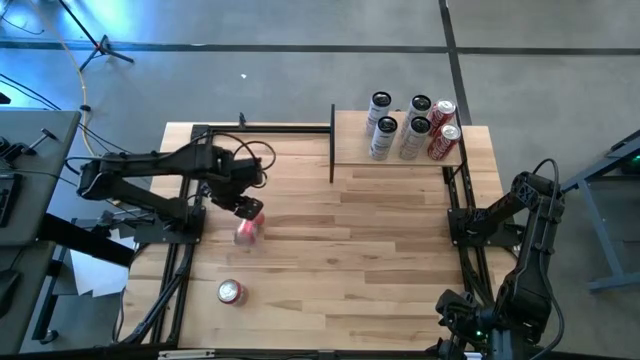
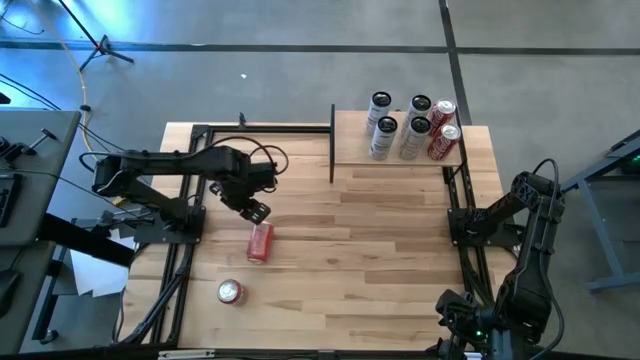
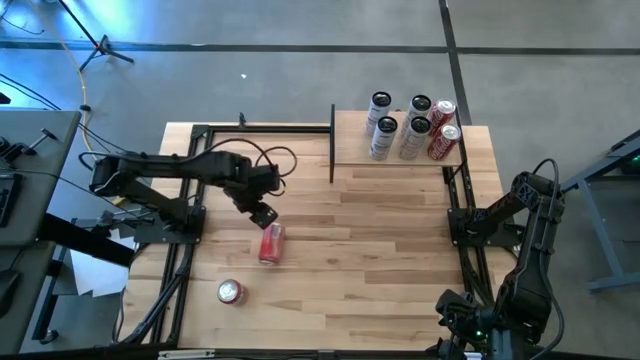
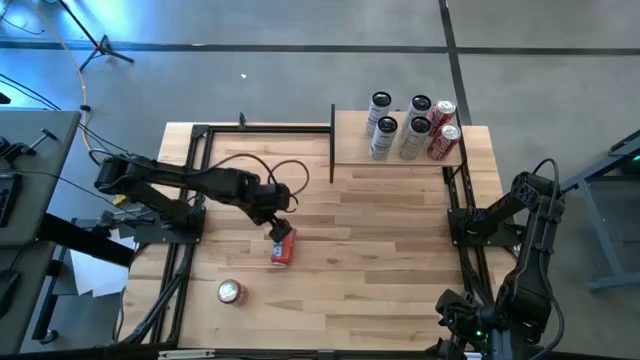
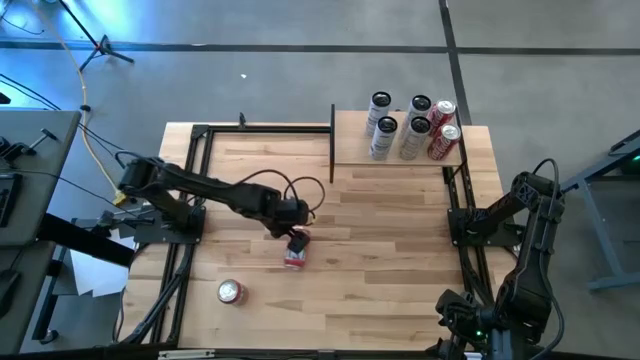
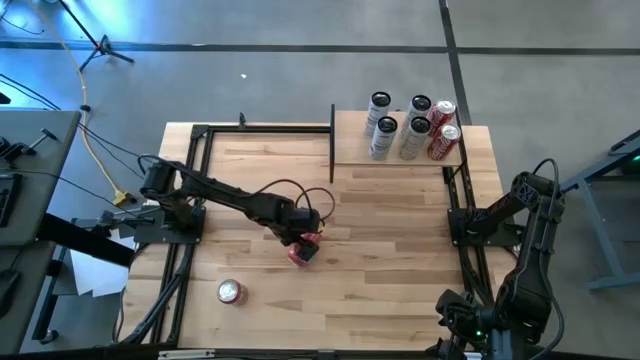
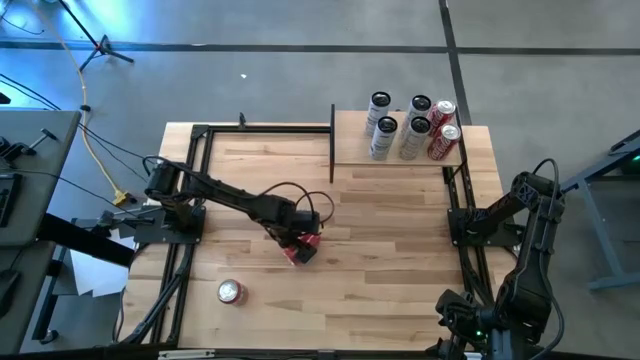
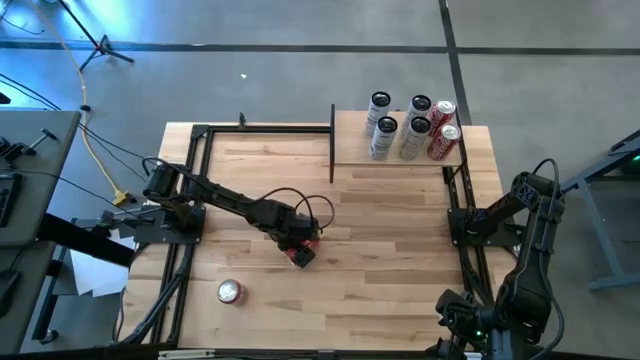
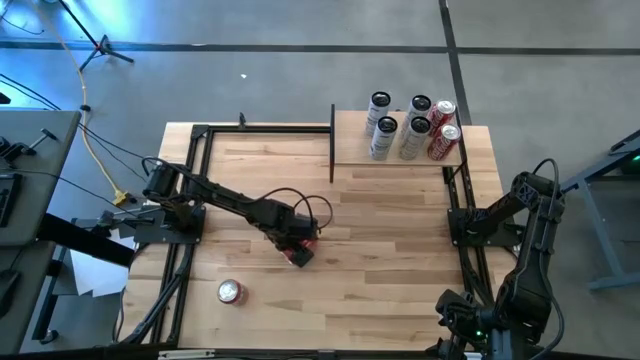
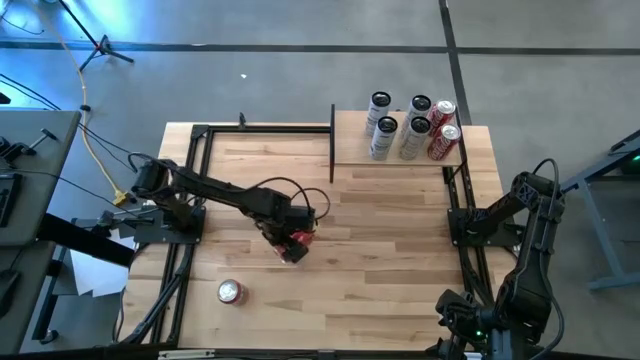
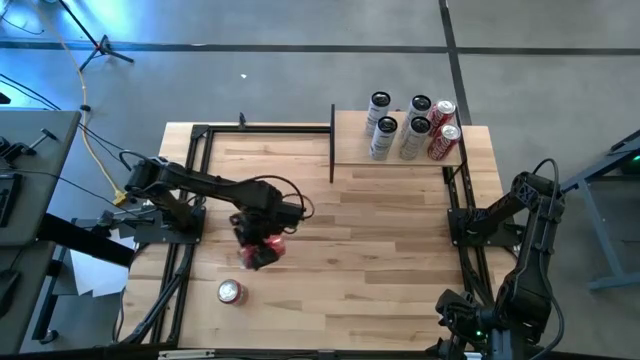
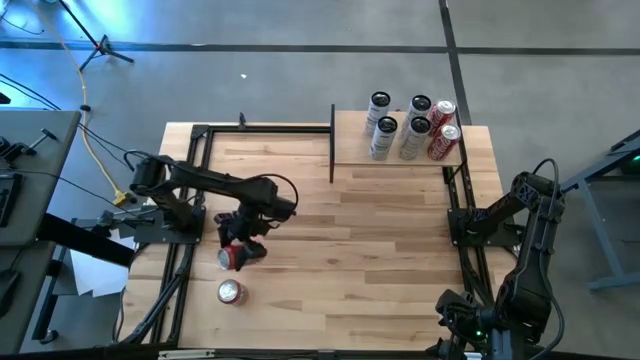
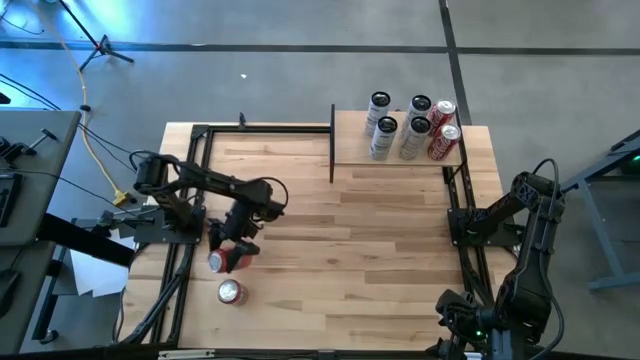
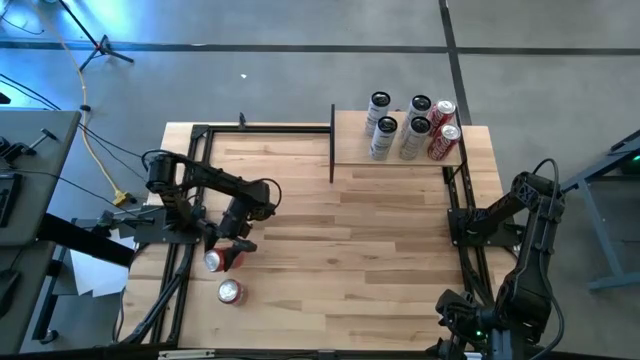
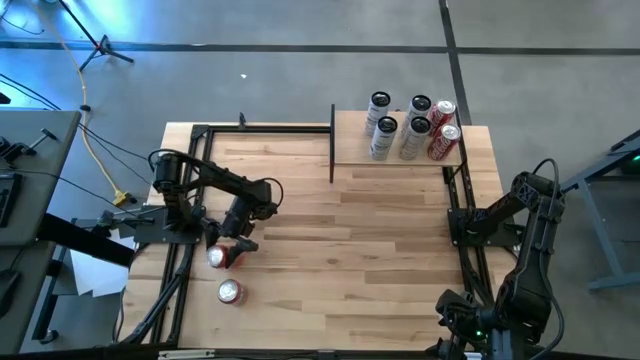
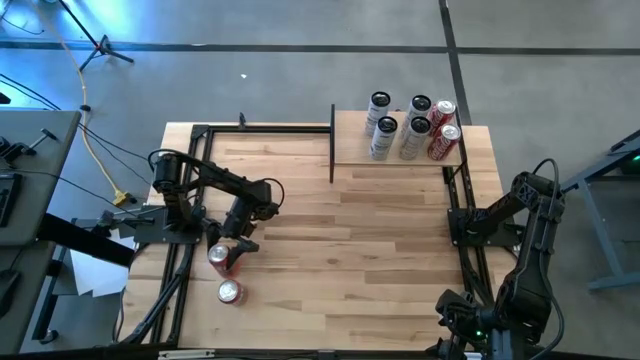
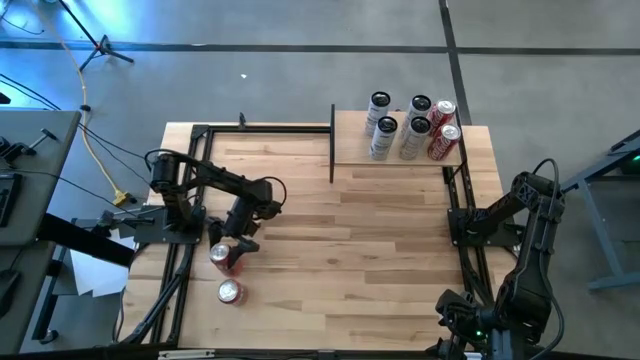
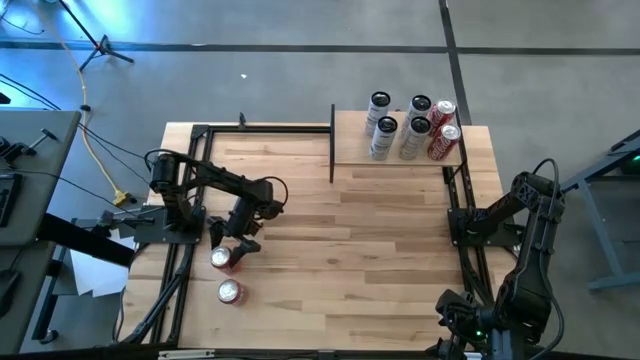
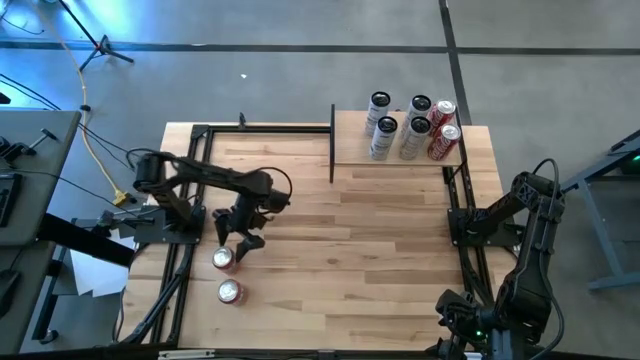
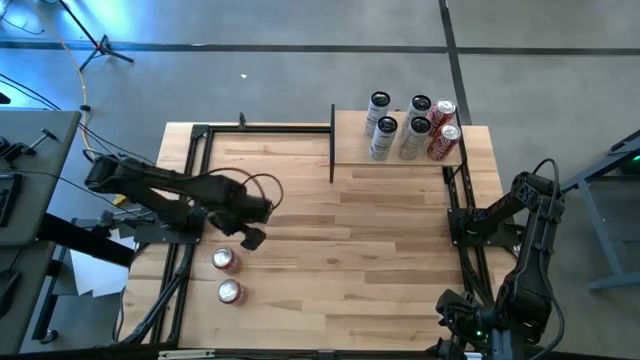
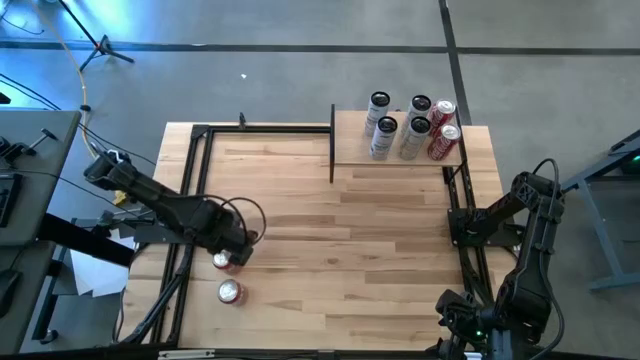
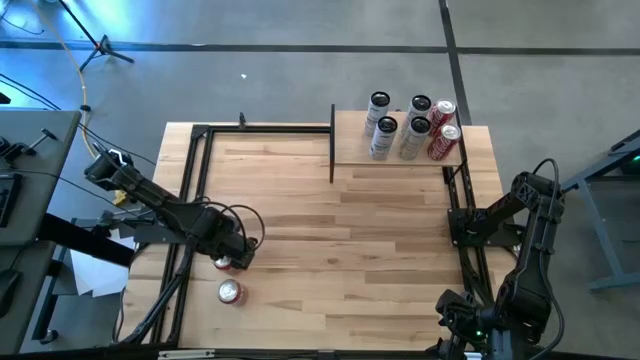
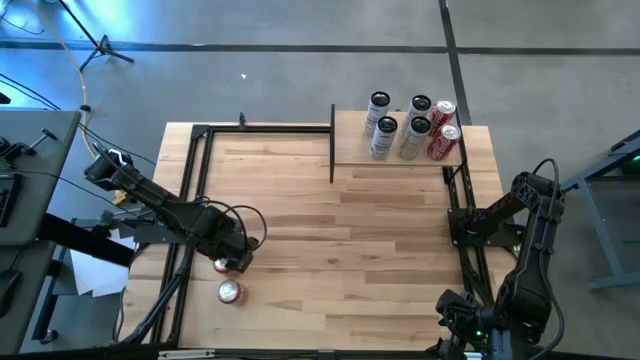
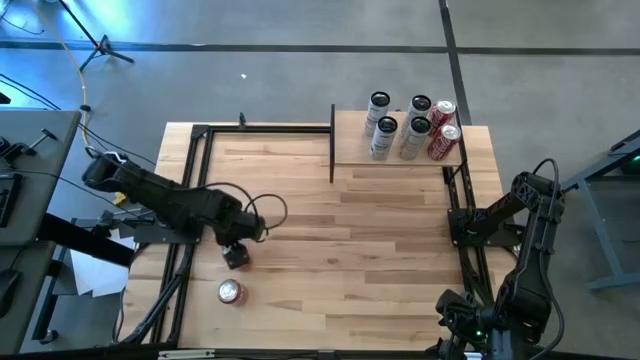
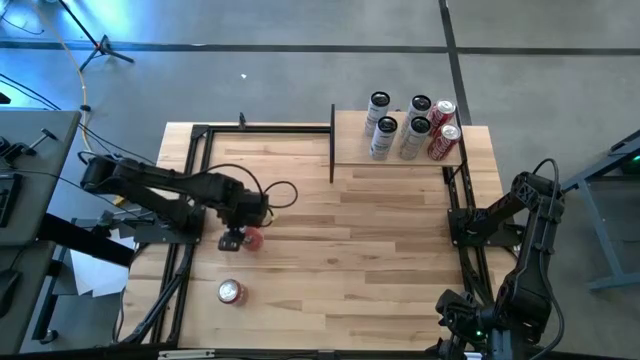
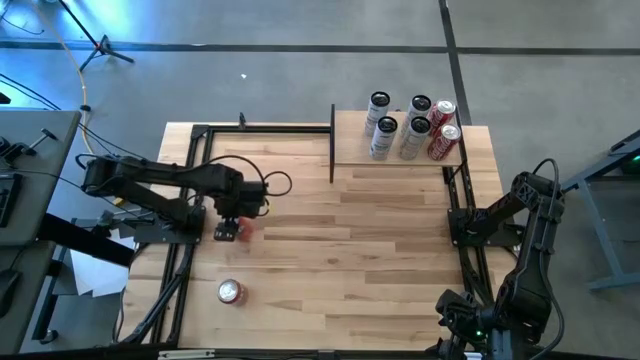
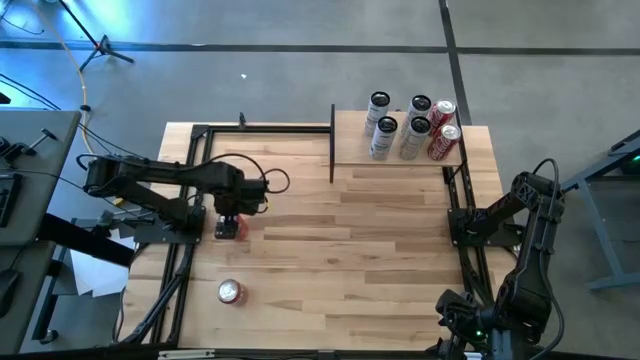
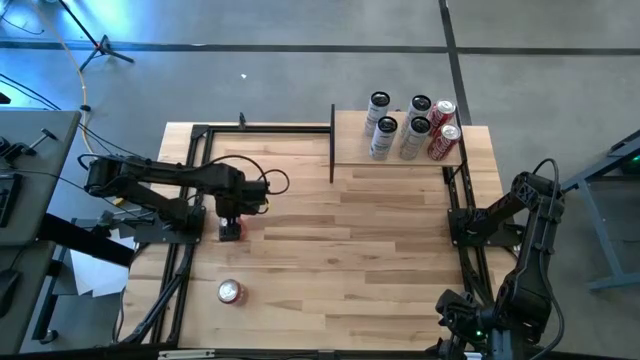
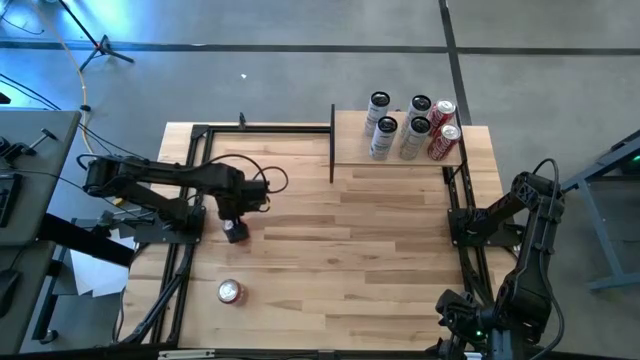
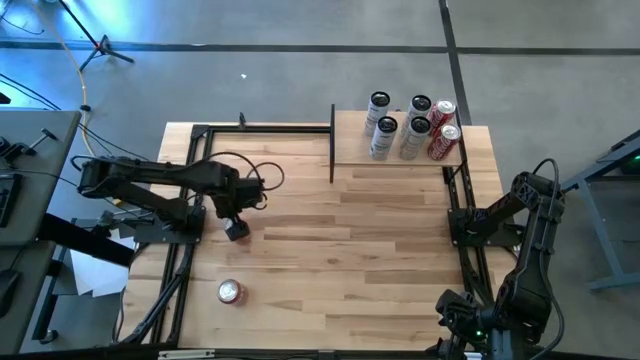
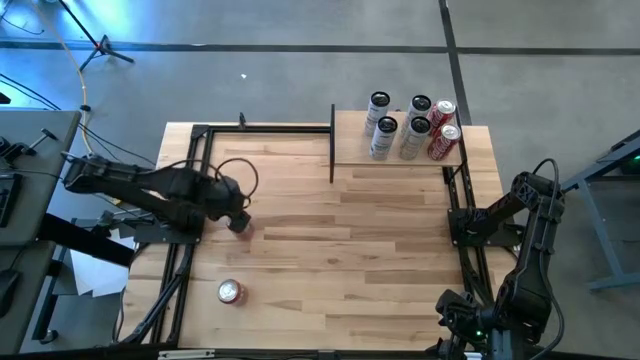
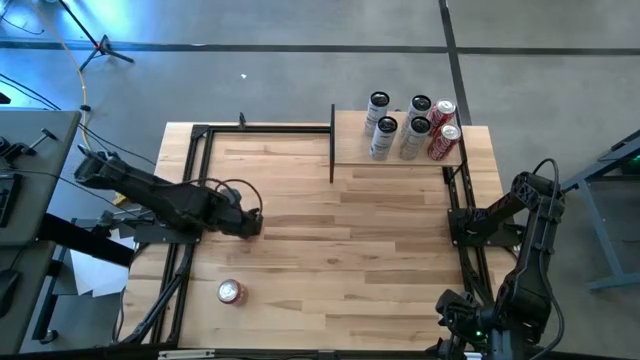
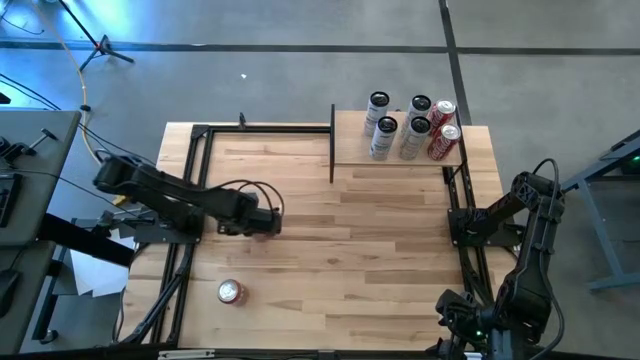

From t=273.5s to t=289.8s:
Task: Place canned beverage on shelf
Put the orange soda can on the shelf

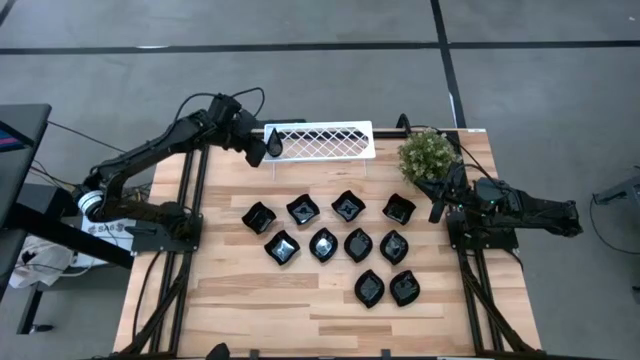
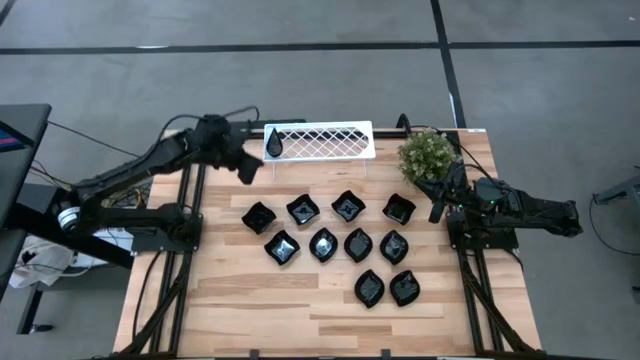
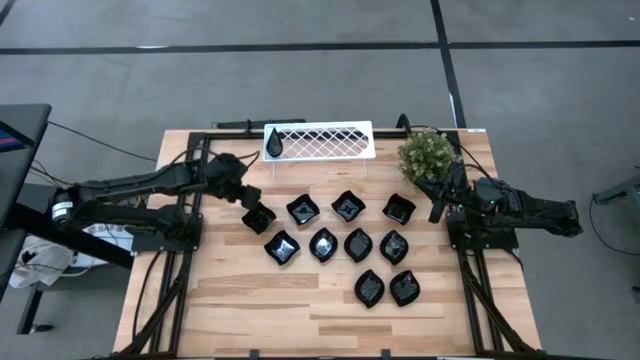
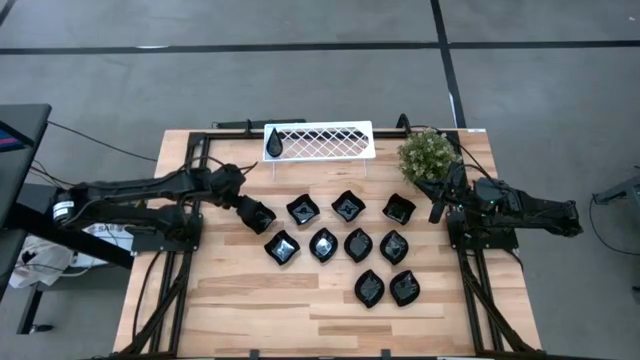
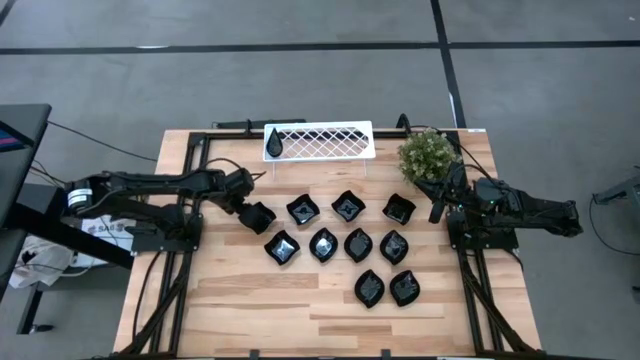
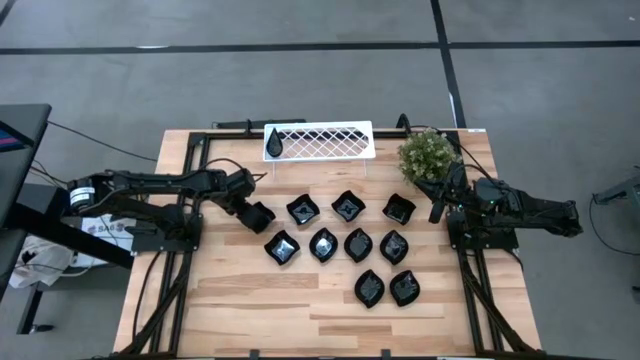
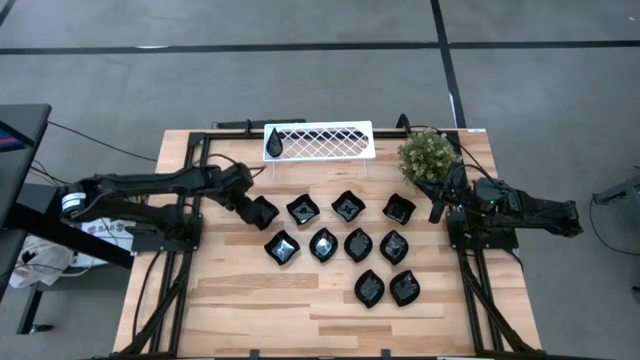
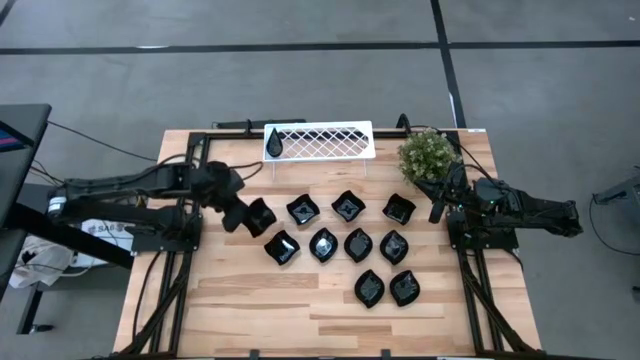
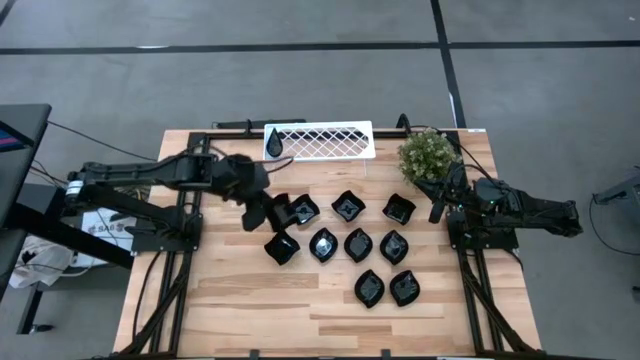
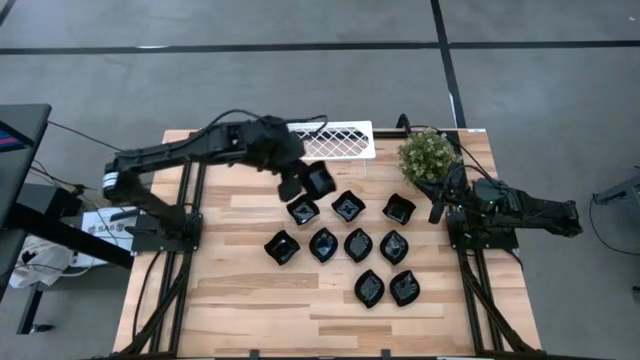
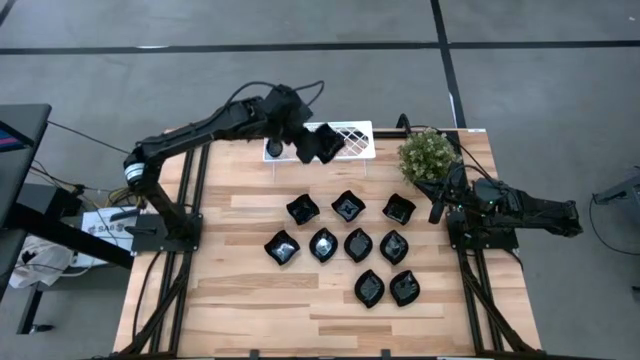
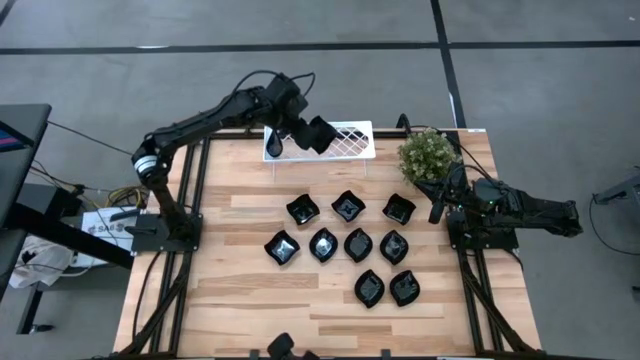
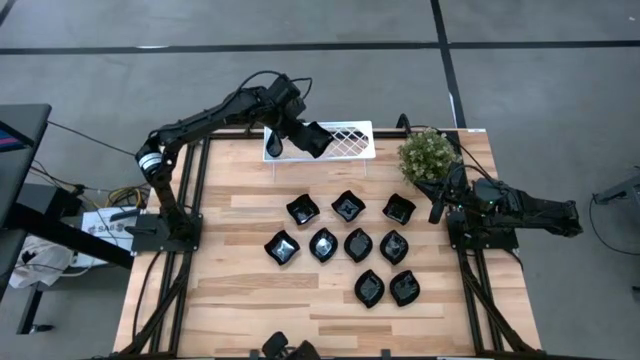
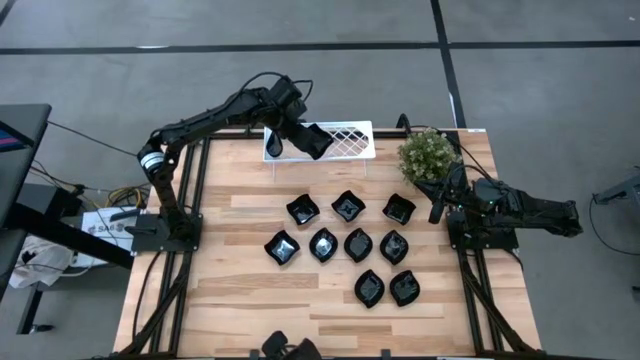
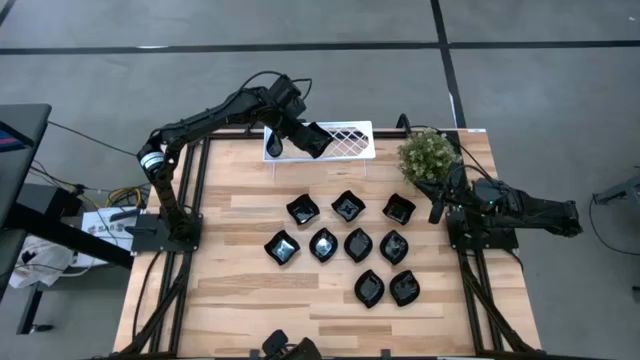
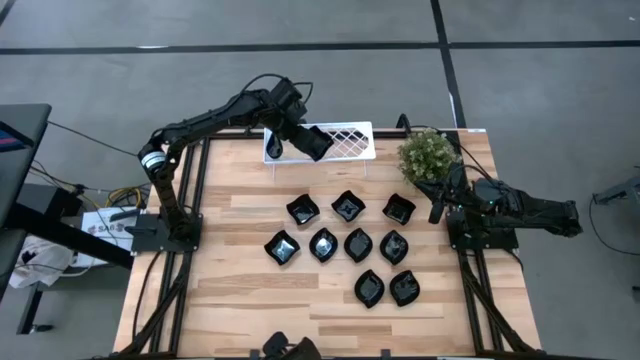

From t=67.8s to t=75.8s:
Task: Pick & Place Mini shaped plates
Put the black distorted square plate on the shelf
